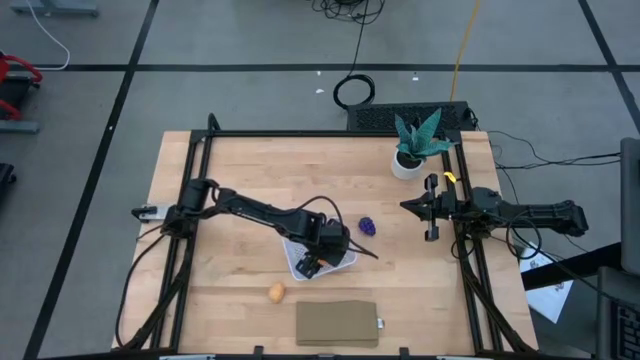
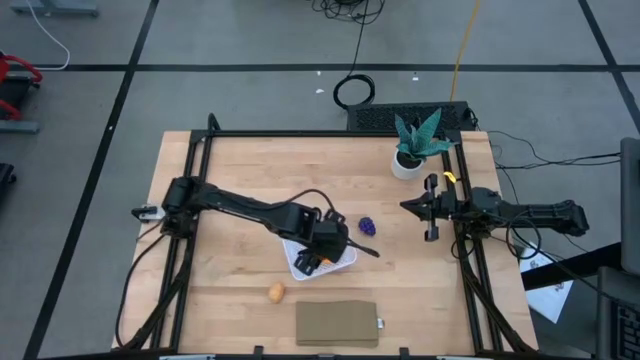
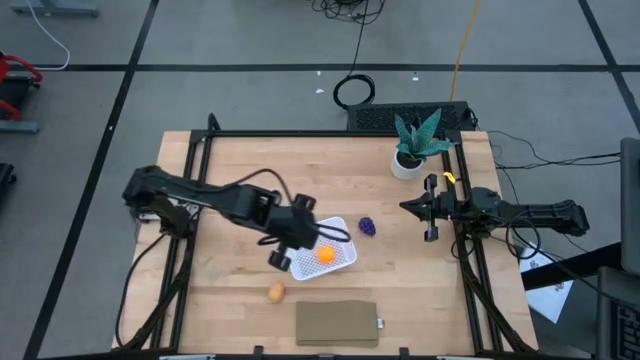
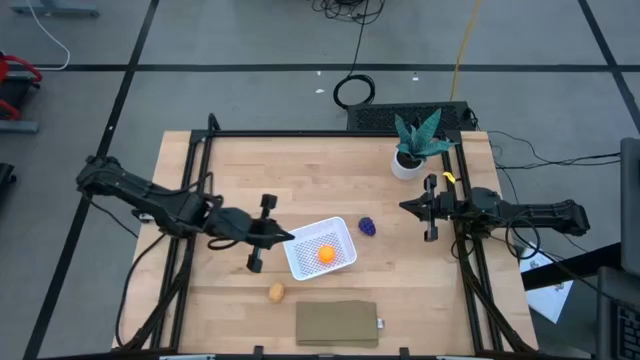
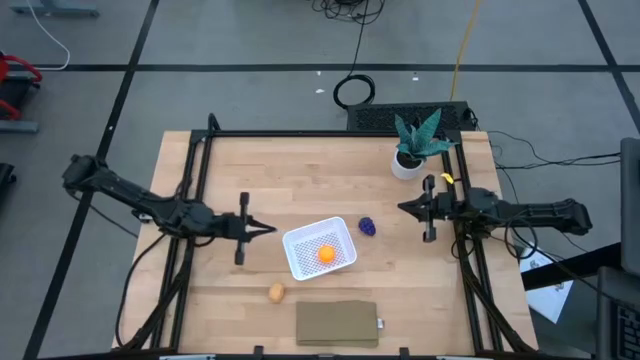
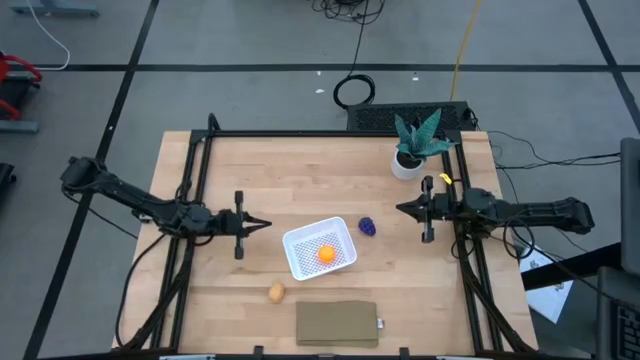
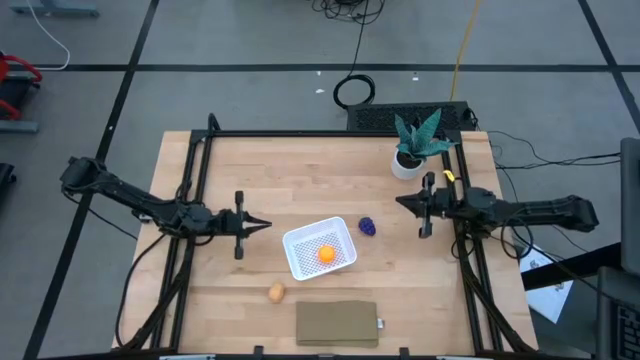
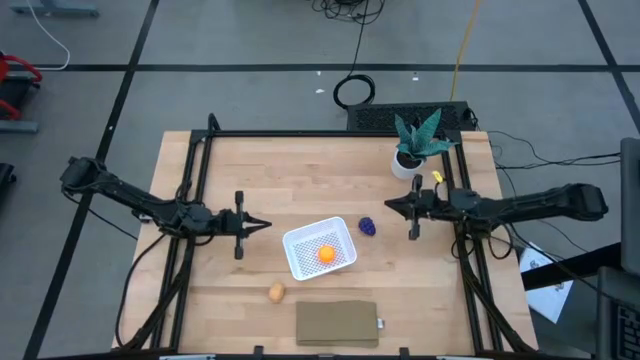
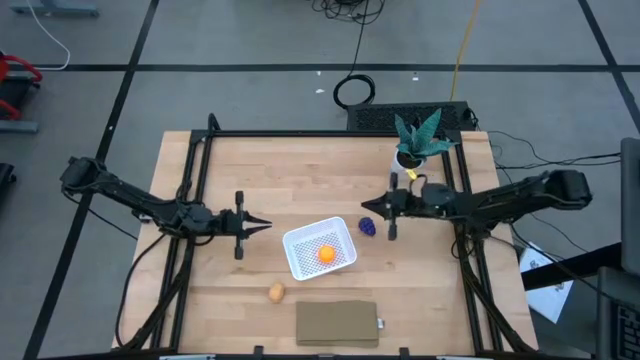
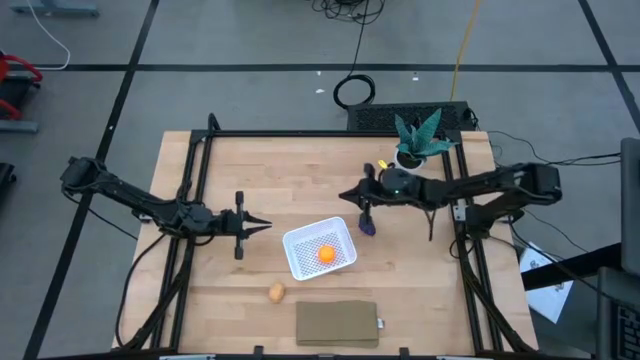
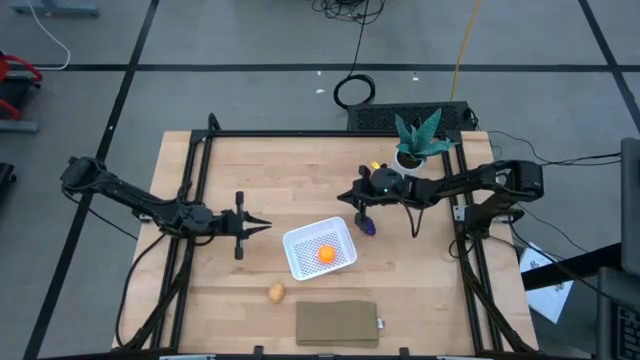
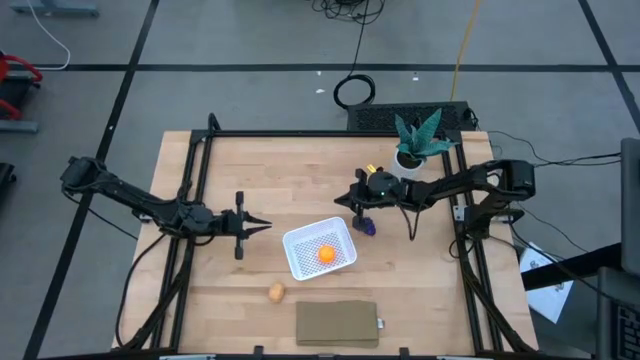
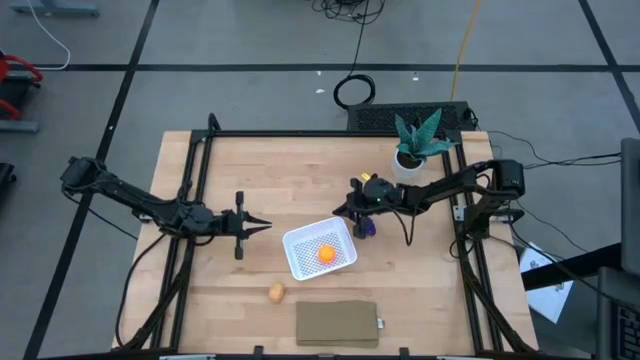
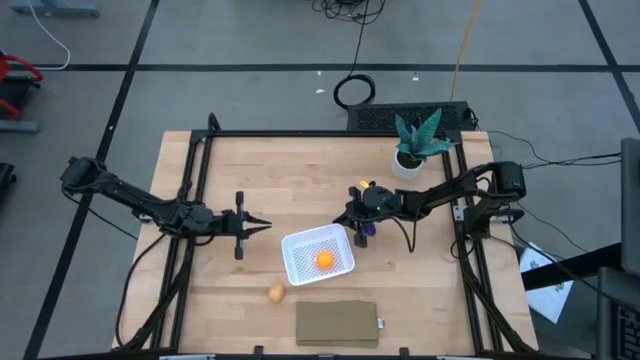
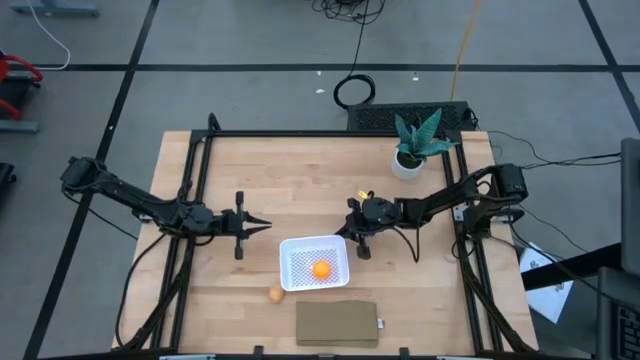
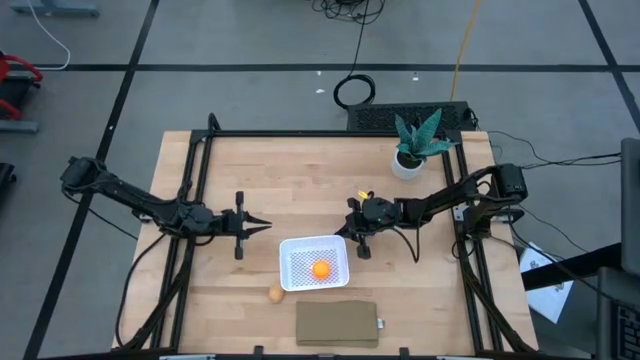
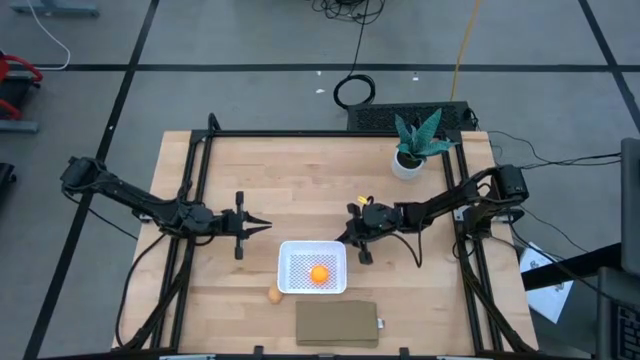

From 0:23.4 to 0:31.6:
Task: Pick and placing Produce into tupperware
Adjust the basket

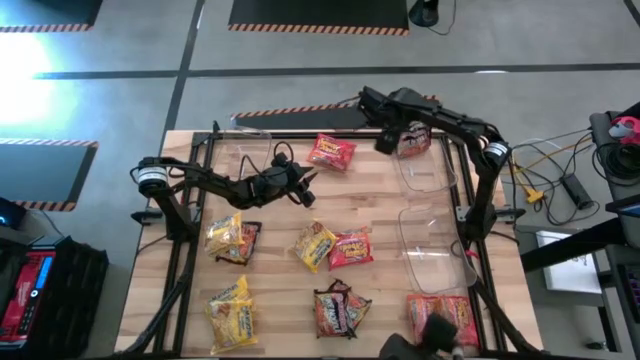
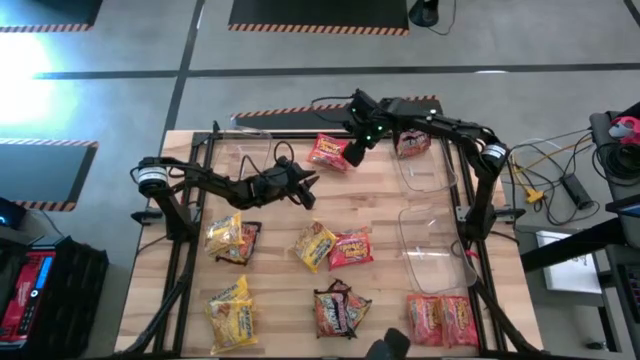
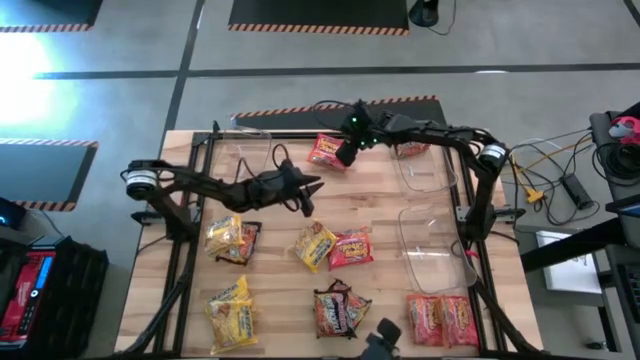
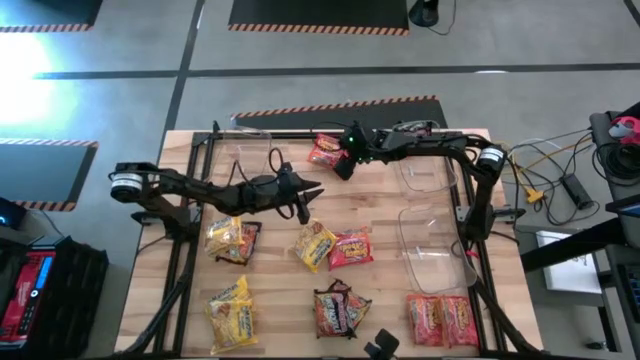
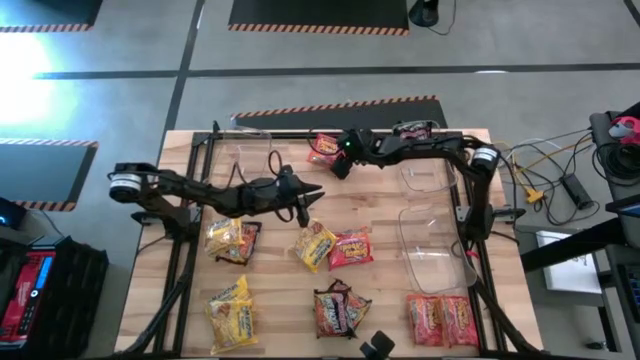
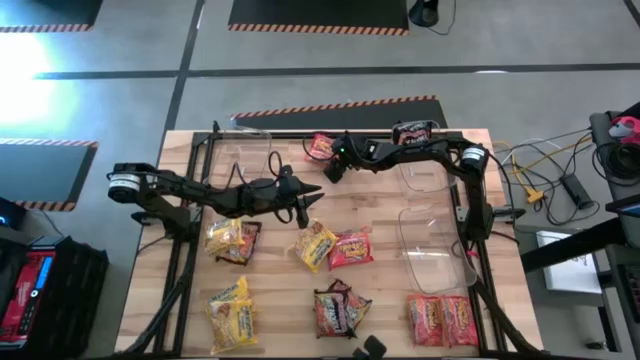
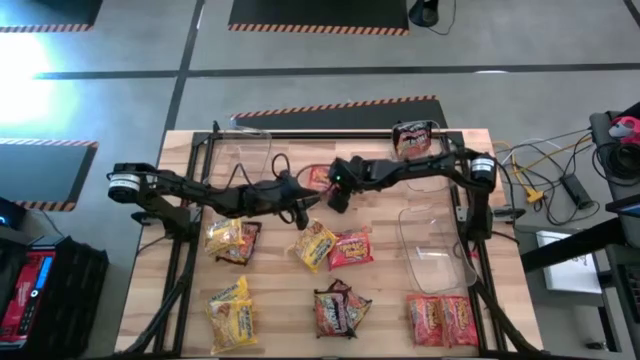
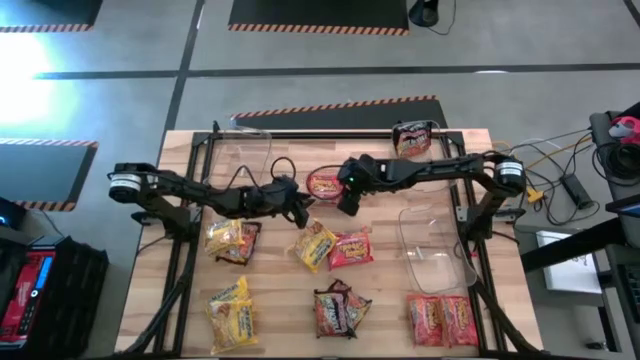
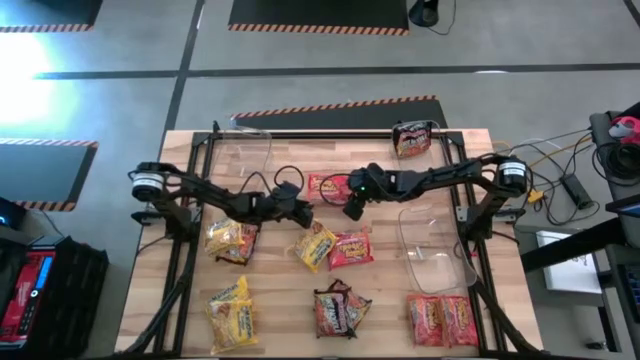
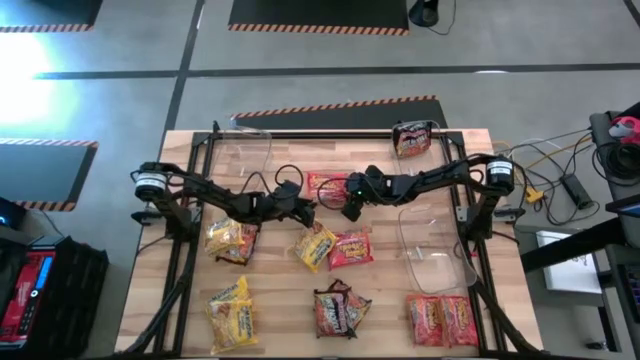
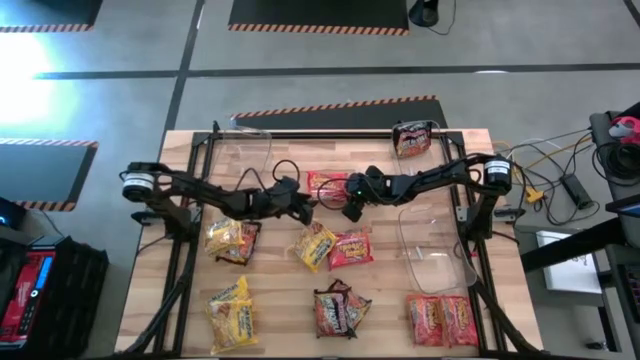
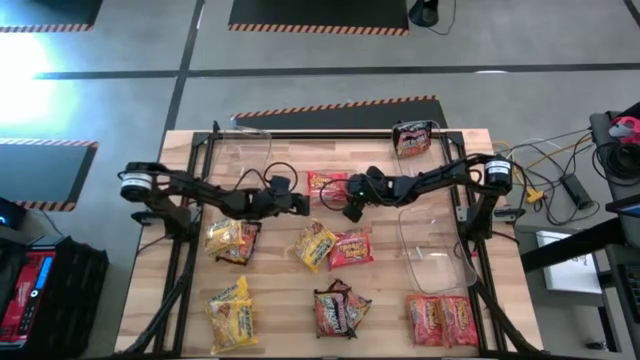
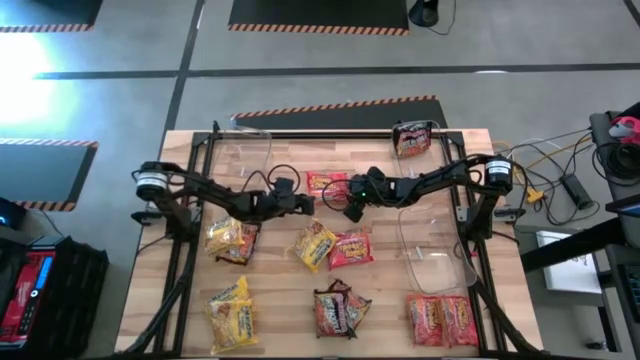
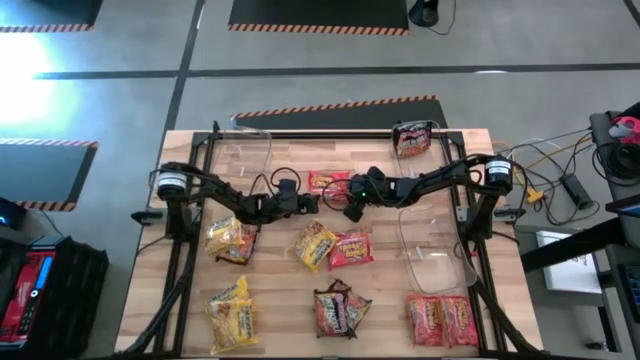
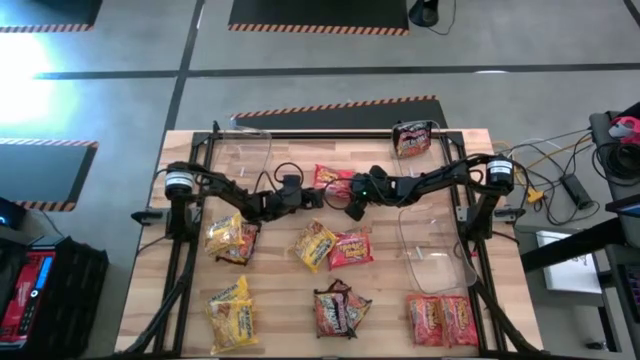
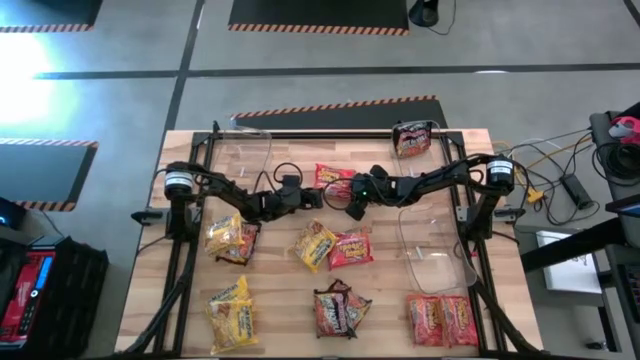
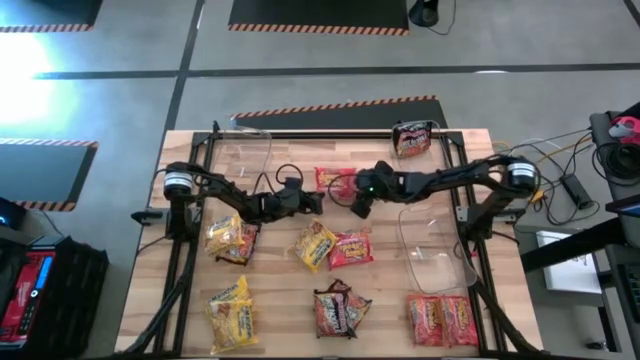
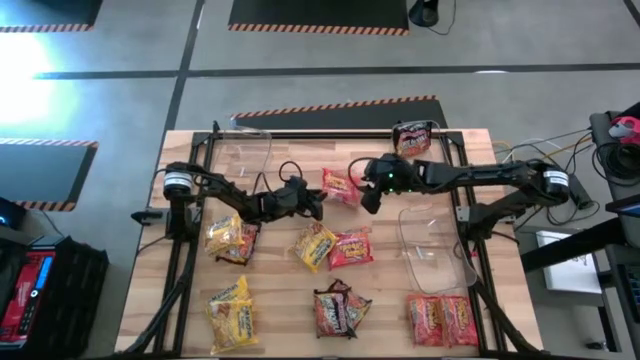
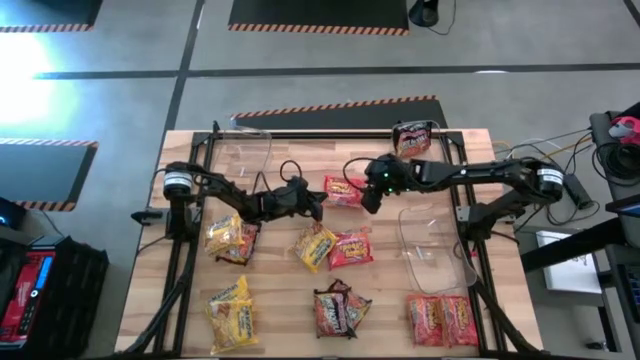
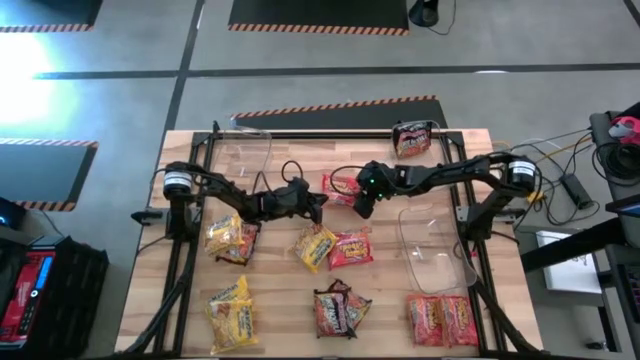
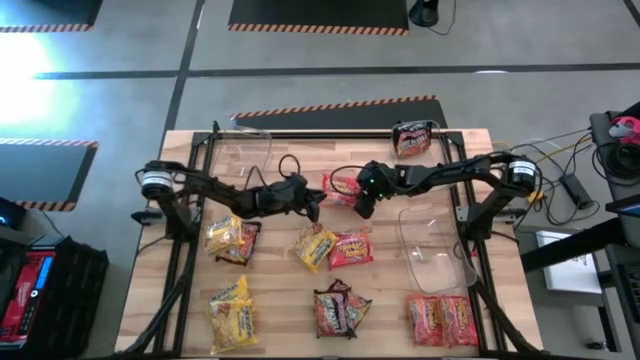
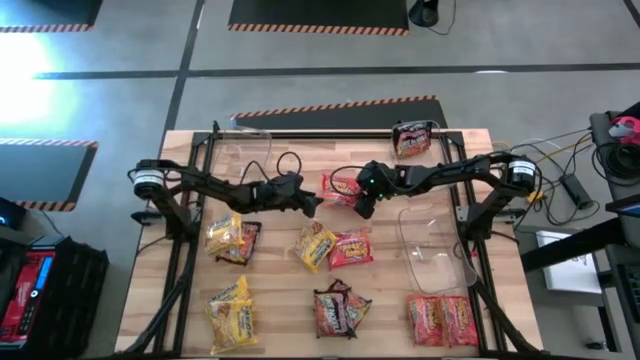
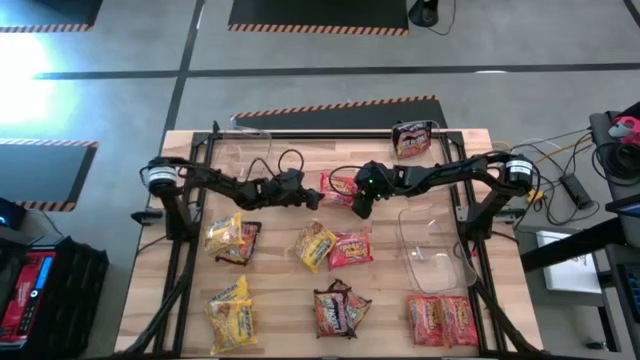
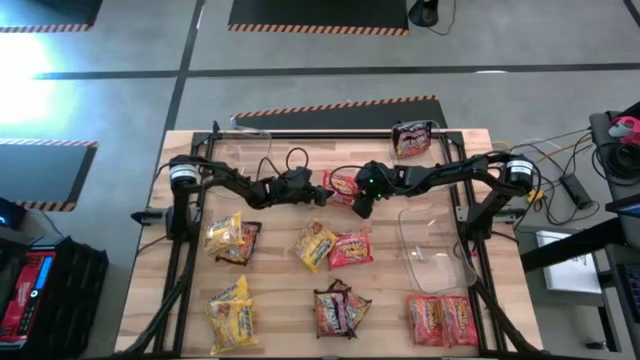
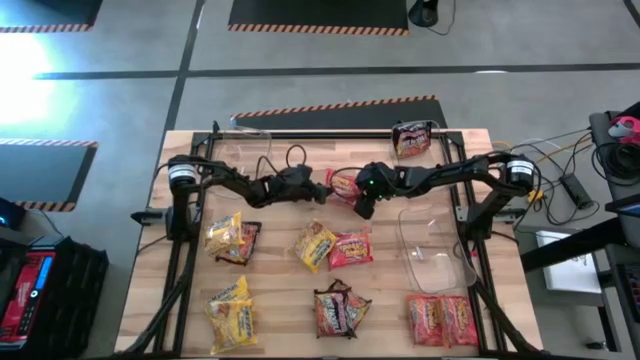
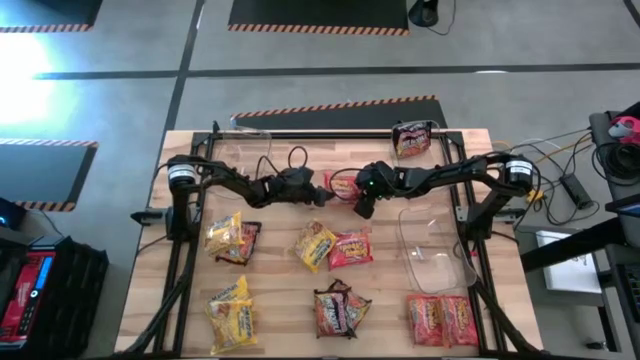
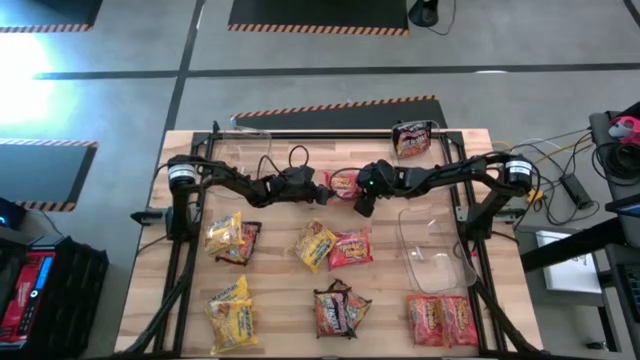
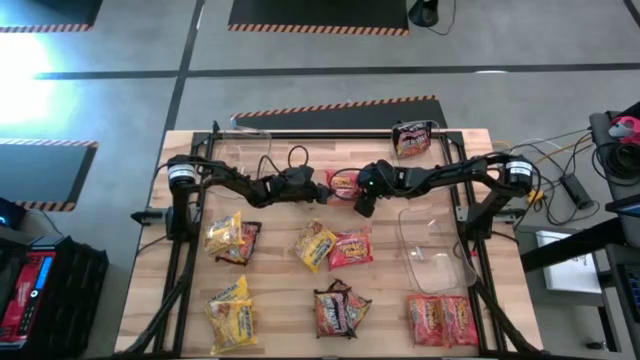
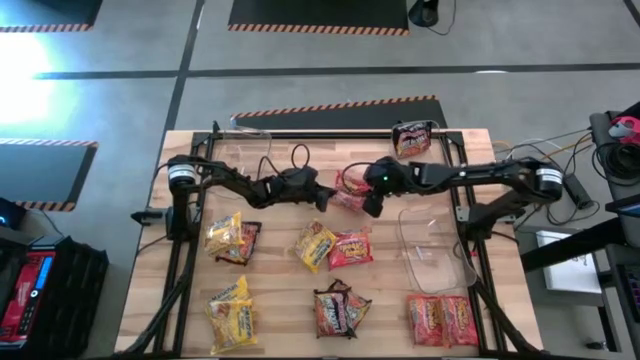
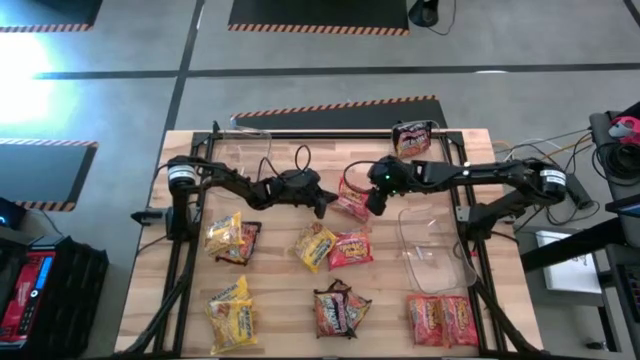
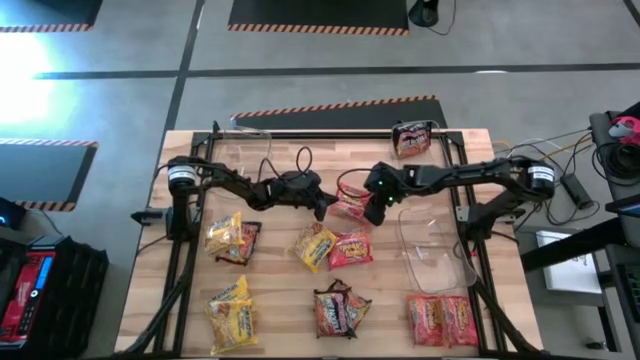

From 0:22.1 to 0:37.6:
Task: Sort Maruchan noodles
Put the orange noodle pack into the bottom transparent bin
